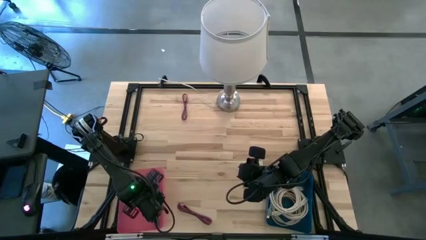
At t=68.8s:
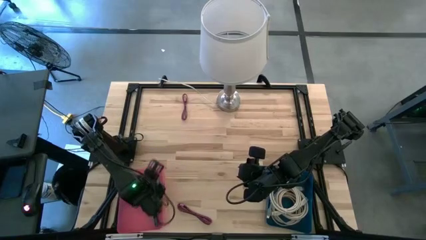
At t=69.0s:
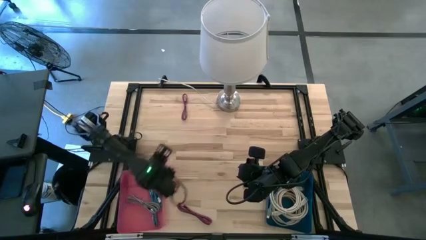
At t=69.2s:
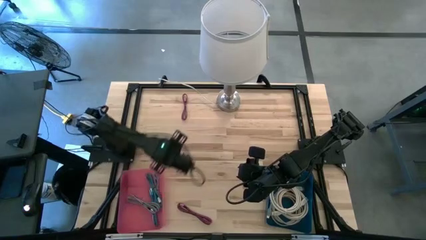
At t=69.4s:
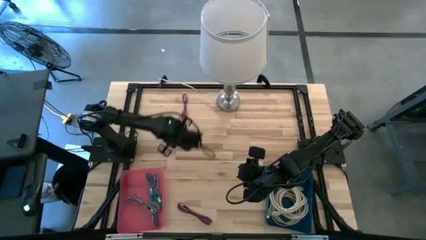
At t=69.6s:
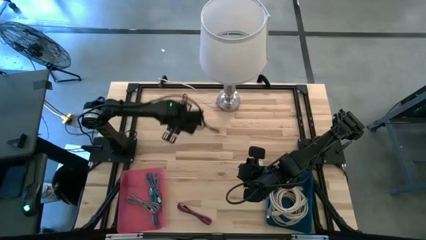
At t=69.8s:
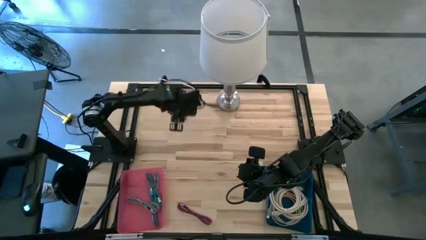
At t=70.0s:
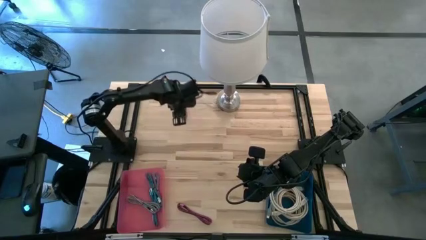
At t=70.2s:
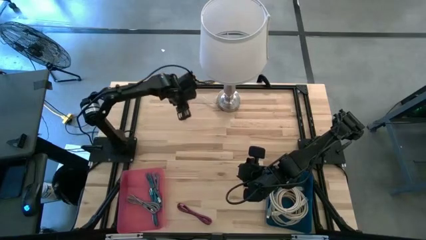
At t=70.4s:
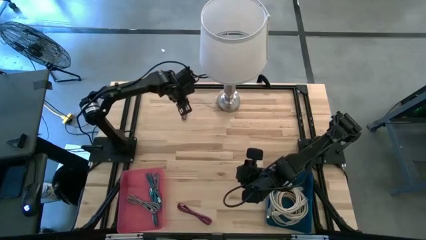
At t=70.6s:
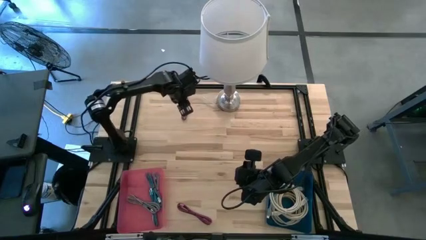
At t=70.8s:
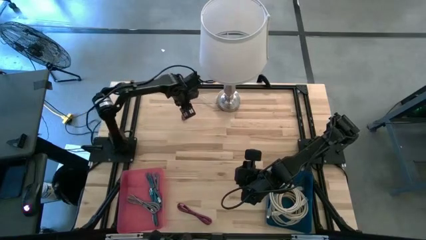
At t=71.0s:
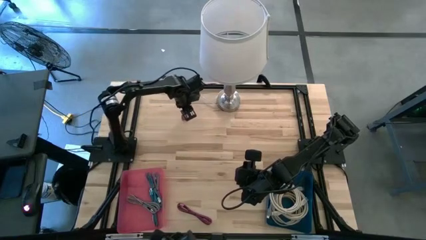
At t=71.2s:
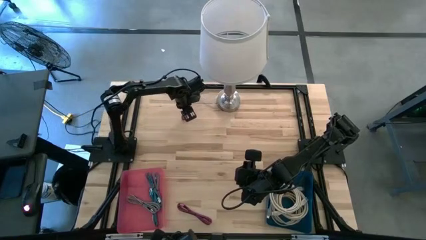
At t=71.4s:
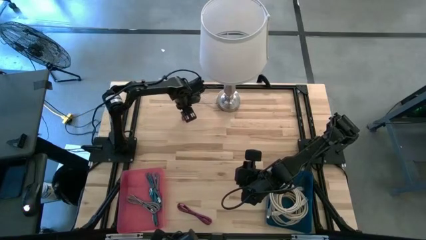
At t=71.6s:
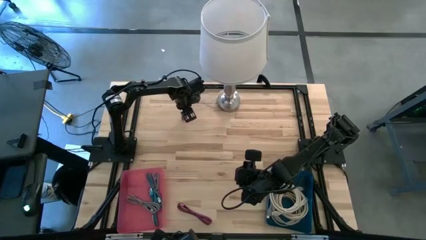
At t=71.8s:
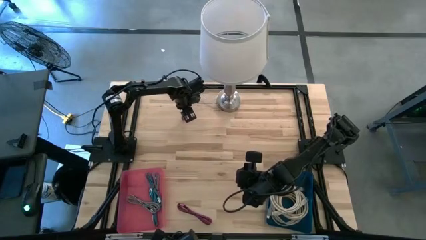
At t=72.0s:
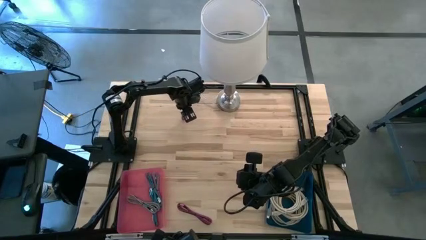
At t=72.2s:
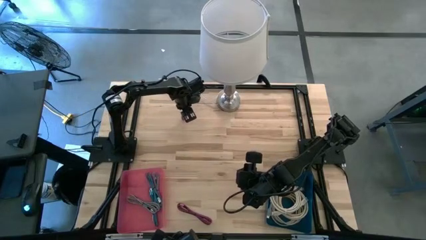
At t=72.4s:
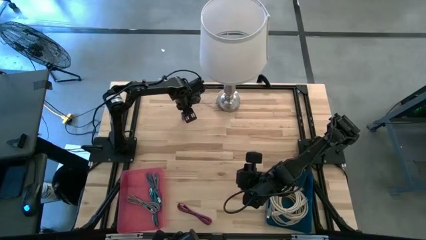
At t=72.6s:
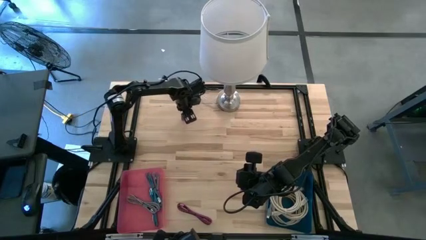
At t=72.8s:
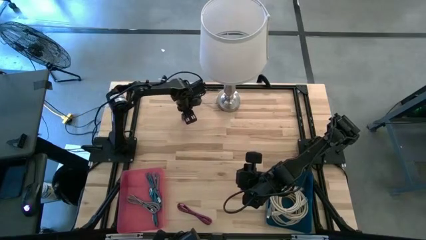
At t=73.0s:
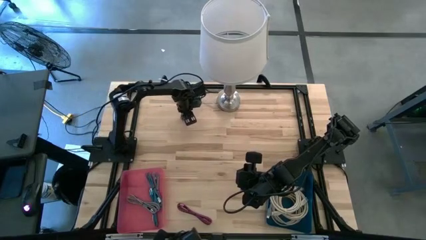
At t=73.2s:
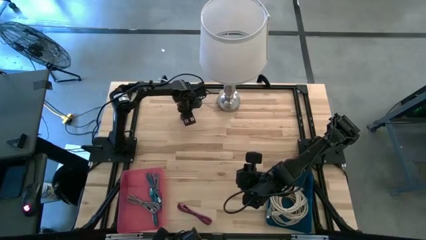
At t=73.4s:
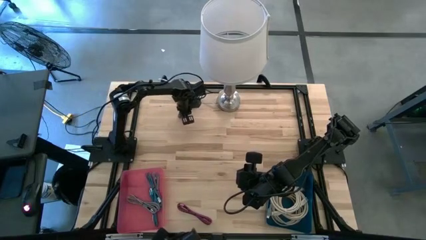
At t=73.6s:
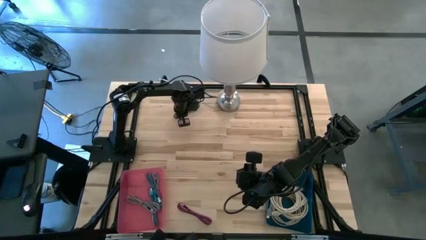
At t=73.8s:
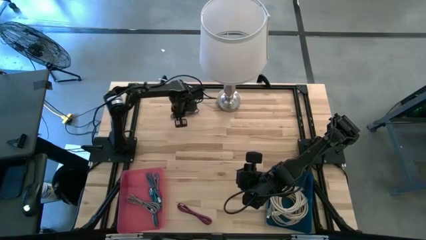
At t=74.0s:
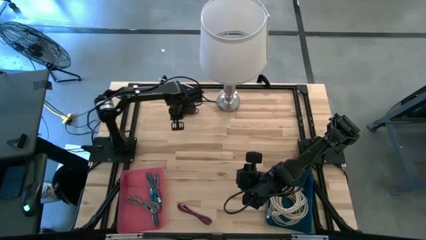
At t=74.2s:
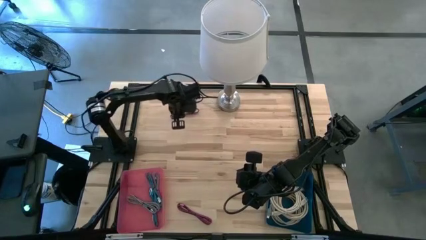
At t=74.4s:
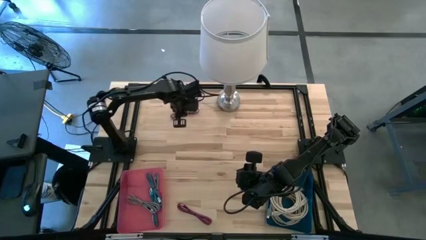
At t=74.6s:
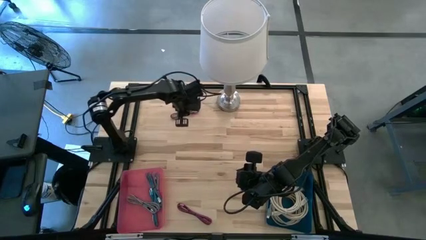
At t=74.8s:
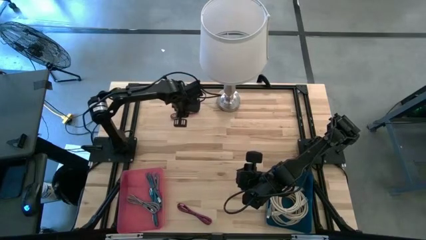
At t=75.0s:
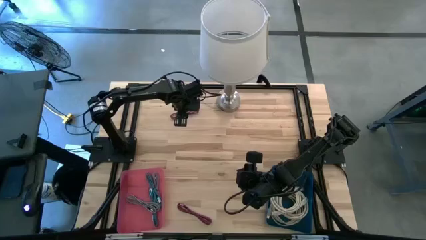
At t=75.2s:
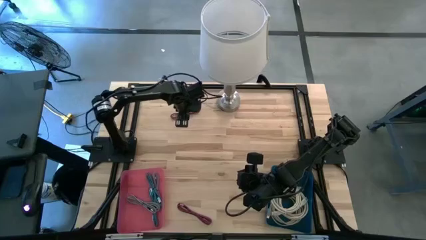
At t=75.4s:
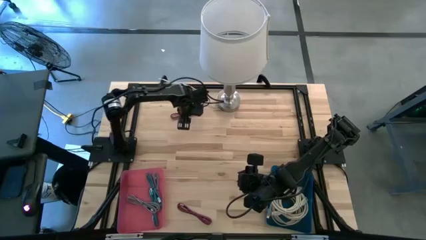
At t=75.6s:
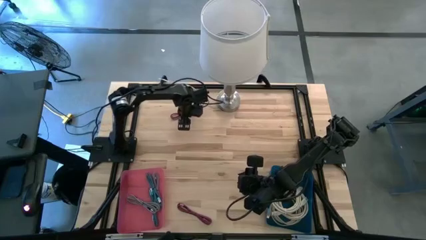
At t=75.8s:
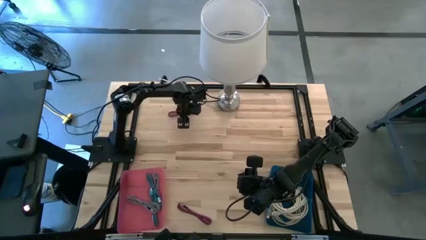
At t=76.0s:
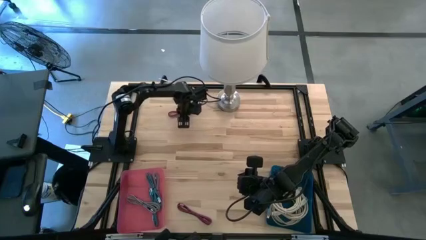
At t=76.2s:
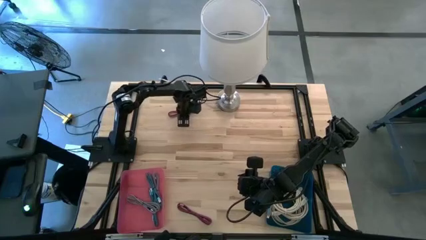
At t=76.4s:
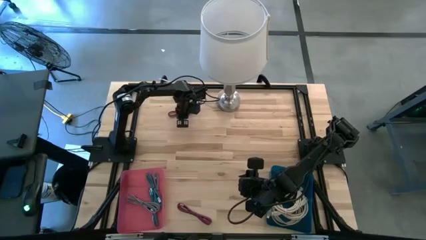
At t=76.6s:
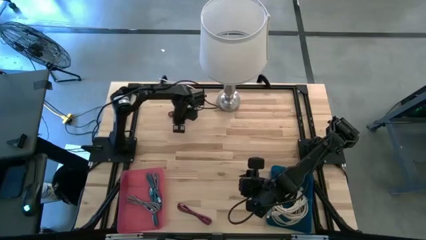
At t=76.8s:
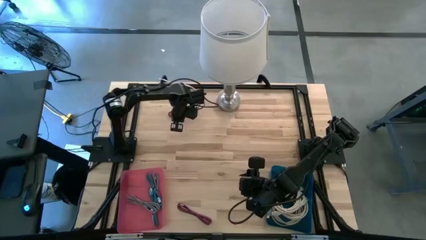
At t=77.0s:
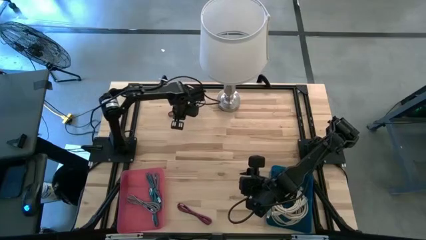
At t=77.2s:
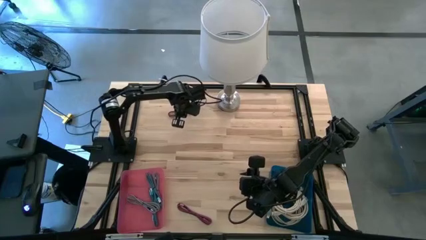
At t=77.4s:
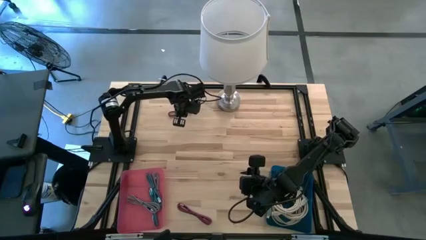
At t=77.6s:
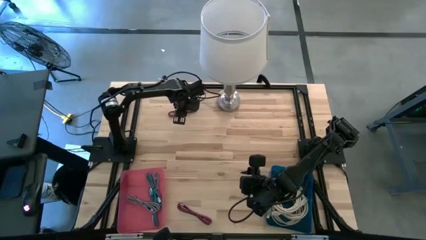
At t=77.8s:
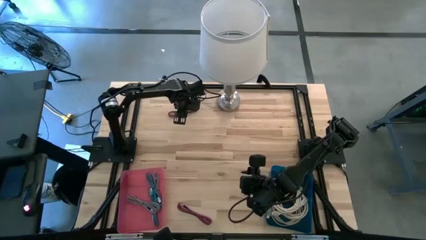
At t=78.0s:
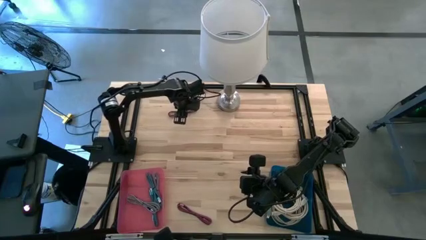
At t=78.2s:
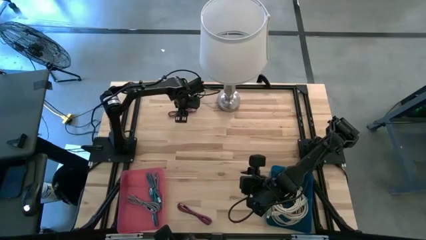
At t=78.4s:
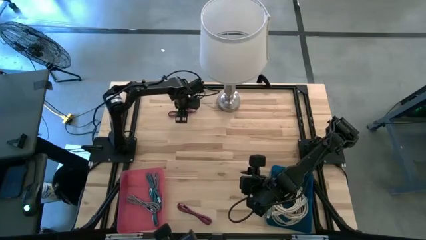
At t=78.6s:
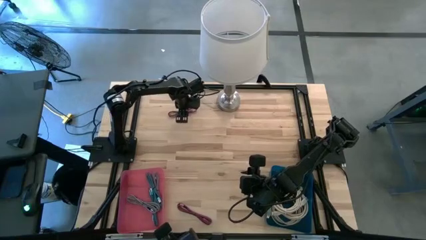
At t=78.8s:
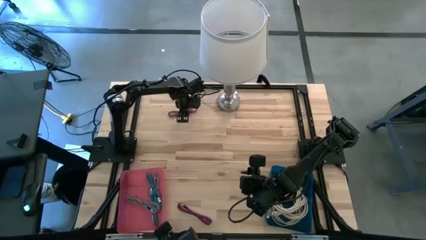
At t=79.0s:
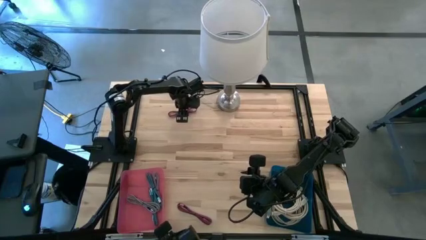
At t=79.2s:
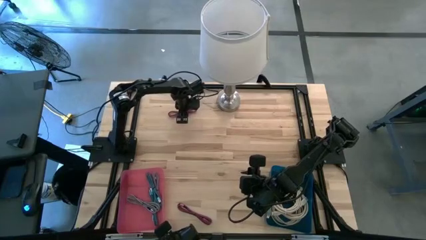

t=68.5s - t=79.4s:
Task: Pick & Place USB Port
Put the top red USB cable into the pink bin

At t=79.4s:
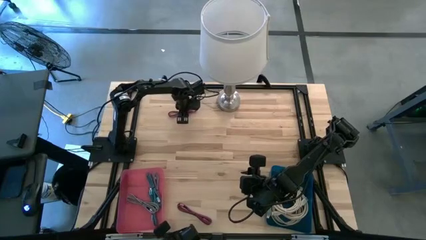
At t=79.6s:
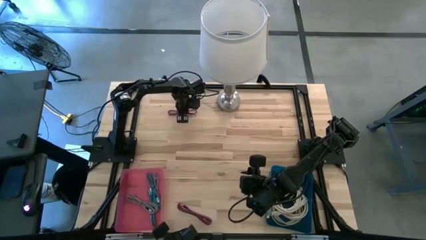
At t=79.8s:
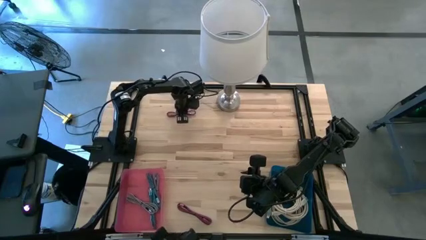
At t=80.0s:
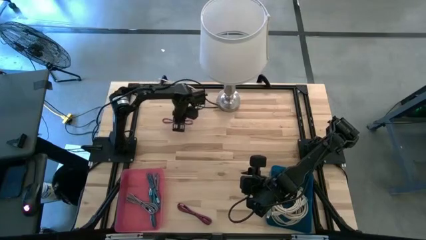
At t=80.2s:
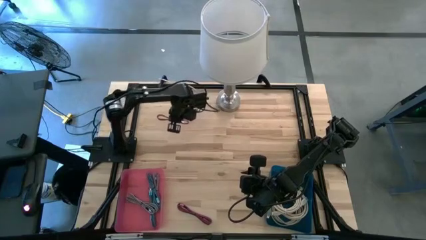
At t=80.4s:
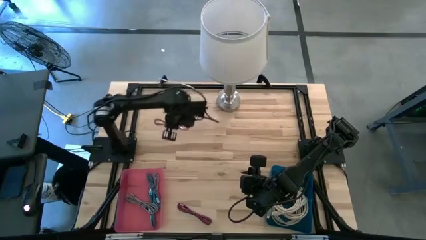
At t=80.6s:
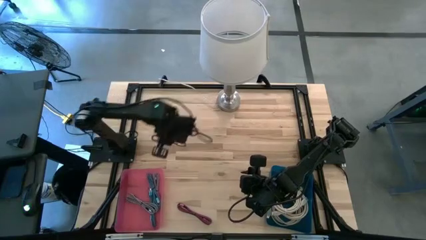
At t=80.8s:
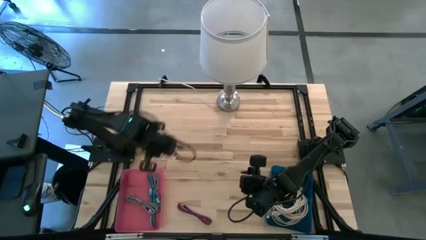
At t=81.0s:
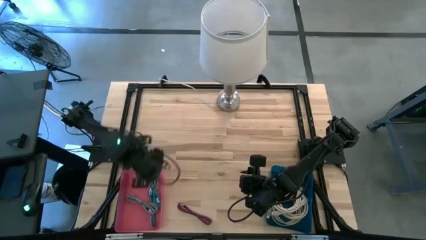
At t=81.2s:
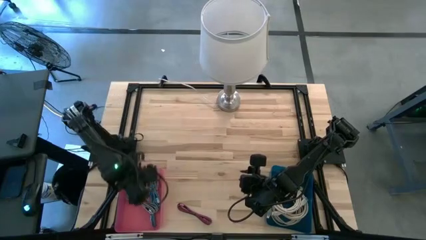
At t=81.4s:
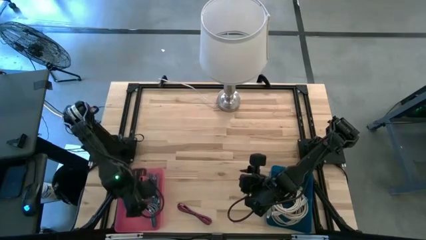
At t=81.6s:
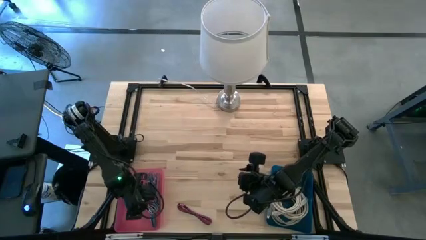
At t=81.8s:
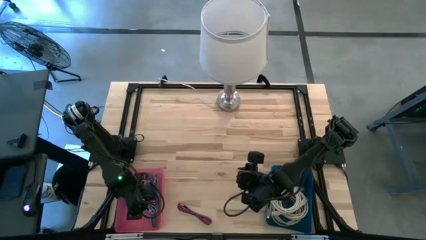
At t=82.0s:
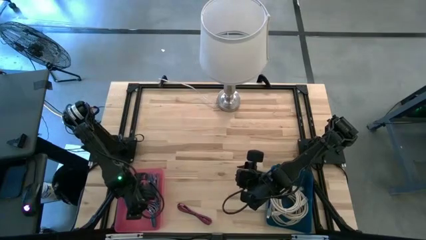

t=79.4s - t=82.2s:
Put the top red USB cable into the pink bin

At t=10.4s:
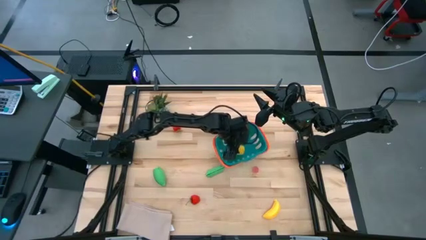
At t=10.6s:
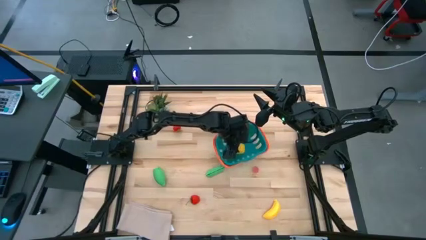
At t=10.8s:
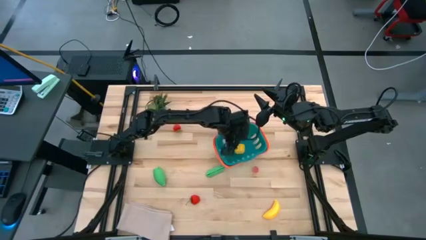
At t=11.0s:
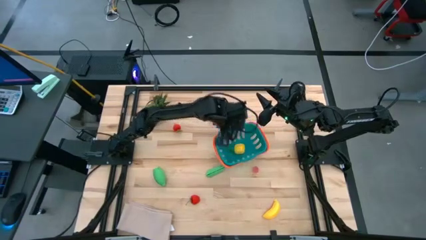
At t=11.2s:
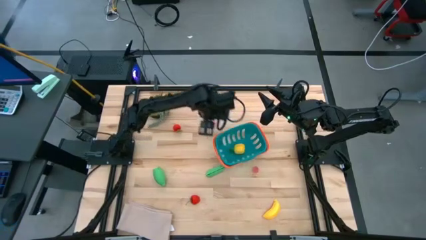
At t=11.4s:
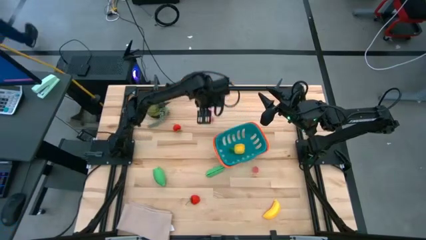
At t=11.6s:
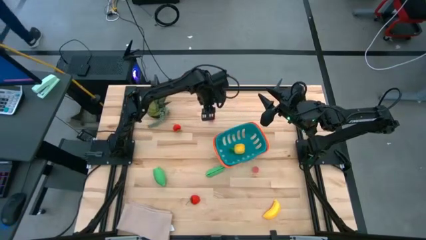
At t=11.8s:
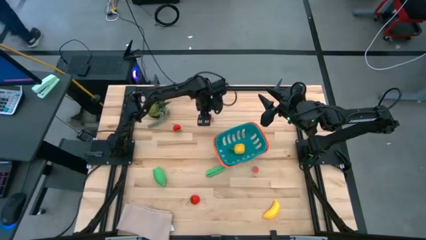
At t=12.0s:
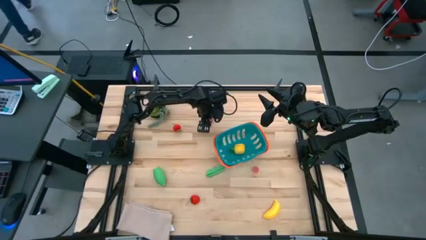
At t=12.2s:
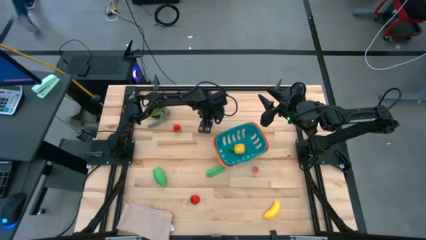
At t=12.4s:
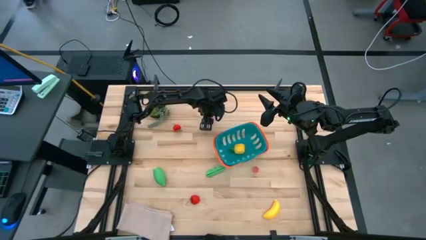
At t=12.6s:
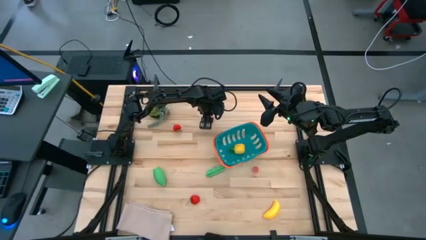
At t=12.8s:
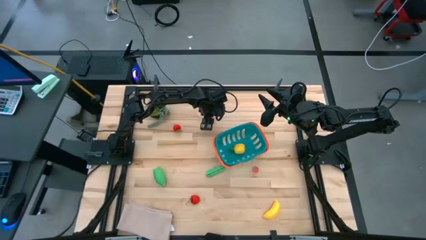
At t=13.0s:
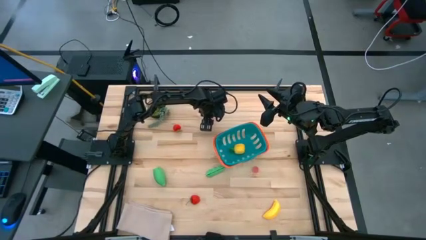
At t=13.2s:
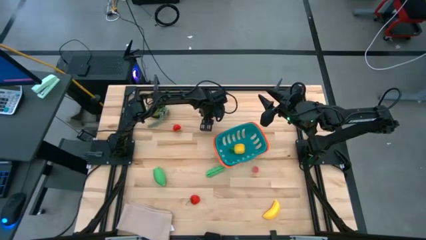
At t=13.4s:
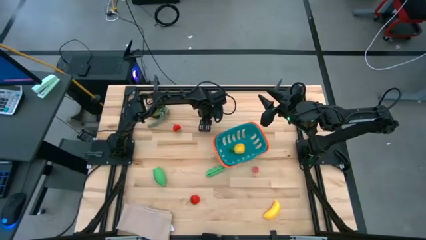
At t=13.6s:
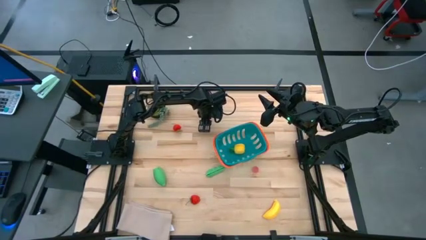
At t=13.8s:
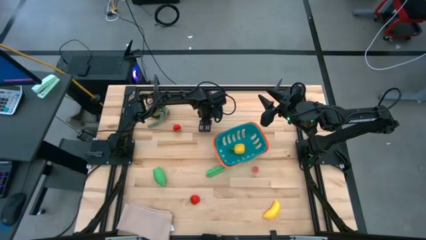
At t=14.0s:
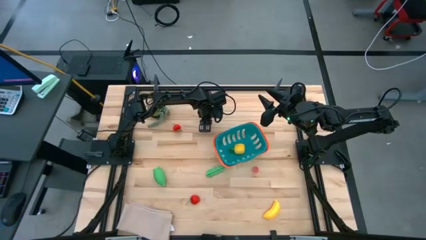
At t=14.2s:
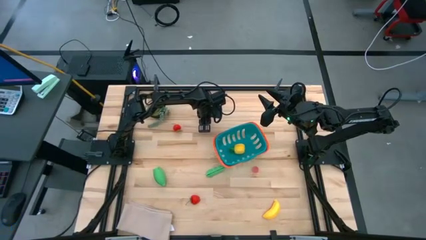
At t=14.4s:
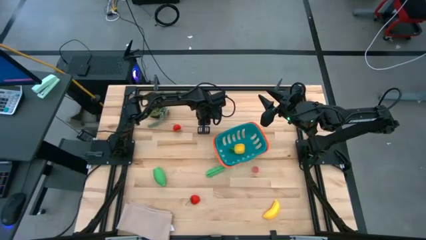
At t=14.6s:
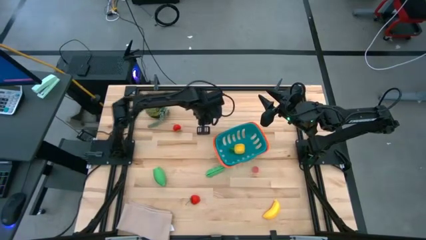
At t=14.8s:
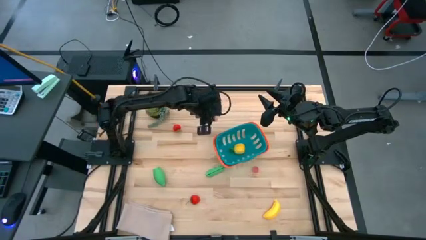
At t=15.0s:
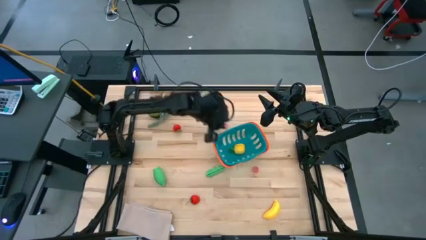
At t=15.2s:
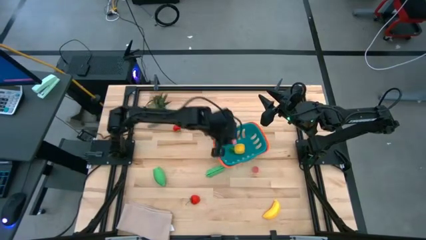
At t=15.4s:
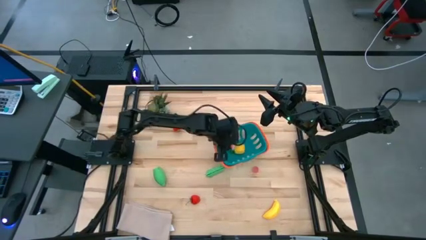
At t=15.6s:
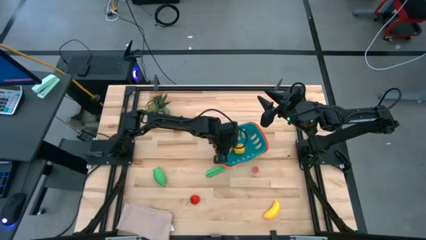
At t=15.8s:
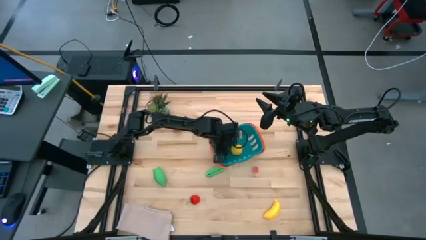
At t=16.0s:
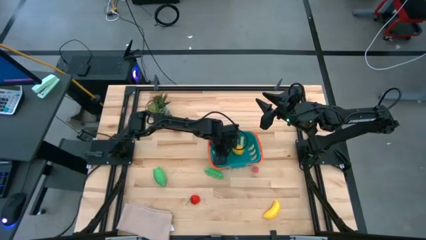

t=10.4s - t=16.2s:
Task: Pick and placing Produce into tupperware
Put the top pink peach into the blue bin
